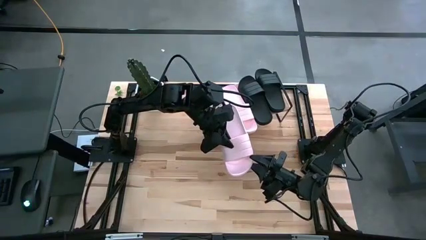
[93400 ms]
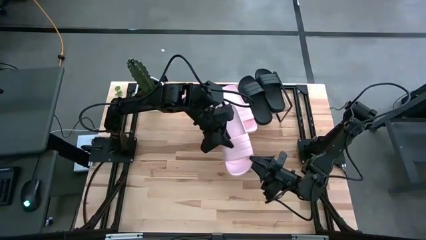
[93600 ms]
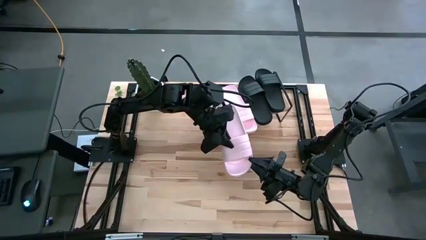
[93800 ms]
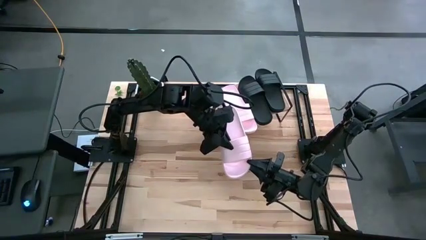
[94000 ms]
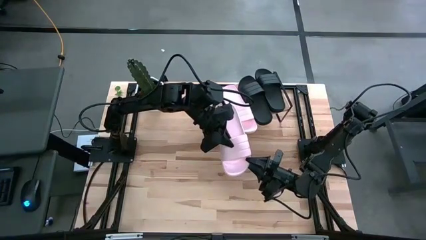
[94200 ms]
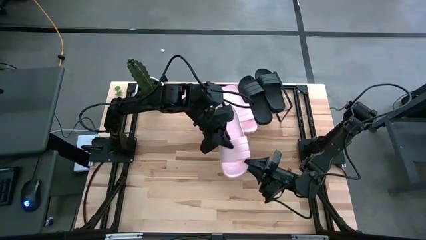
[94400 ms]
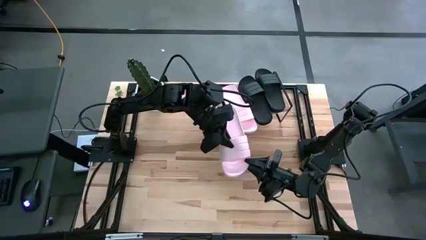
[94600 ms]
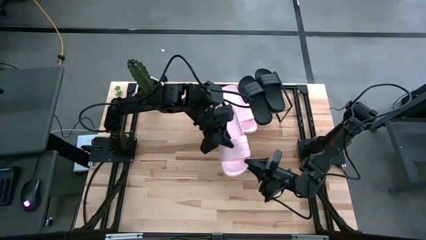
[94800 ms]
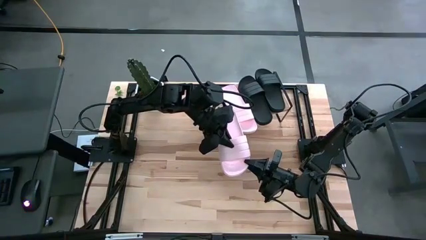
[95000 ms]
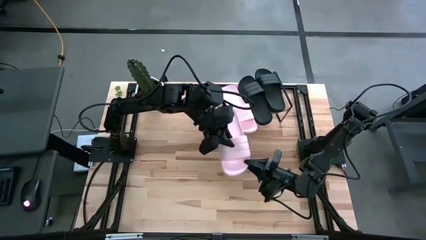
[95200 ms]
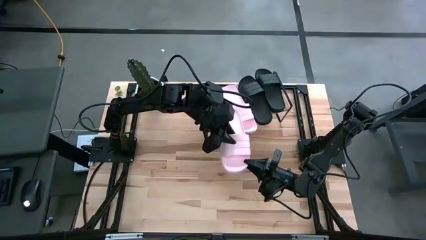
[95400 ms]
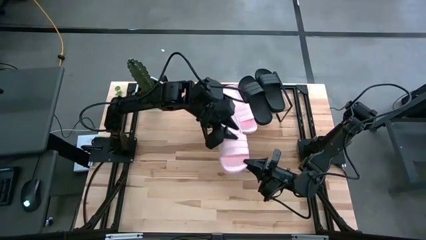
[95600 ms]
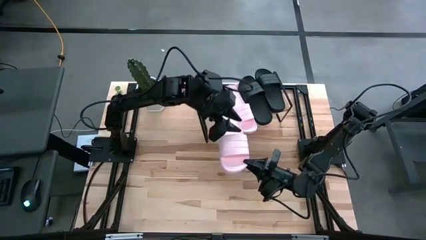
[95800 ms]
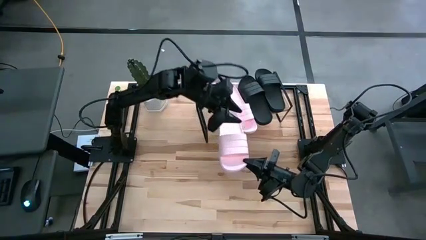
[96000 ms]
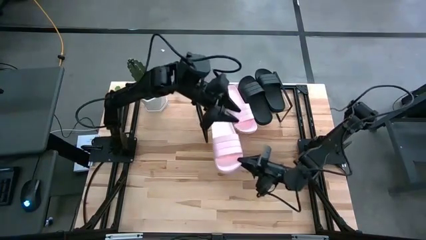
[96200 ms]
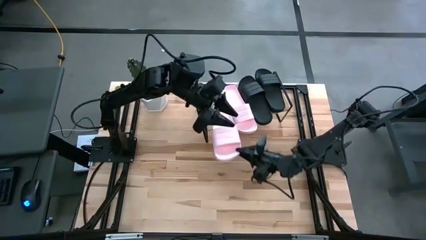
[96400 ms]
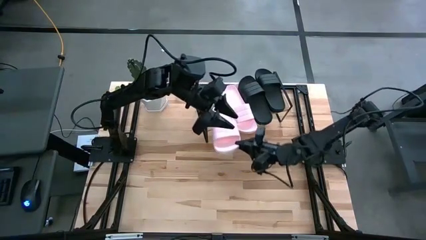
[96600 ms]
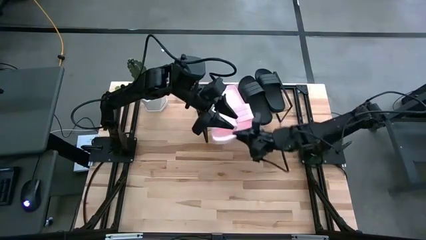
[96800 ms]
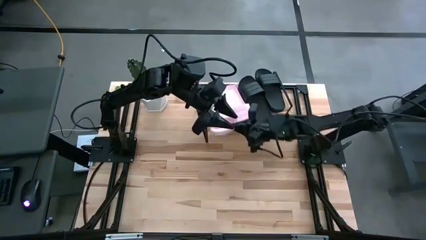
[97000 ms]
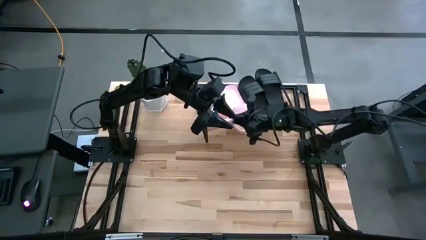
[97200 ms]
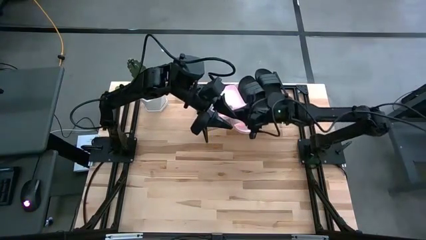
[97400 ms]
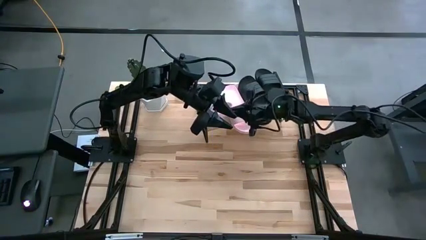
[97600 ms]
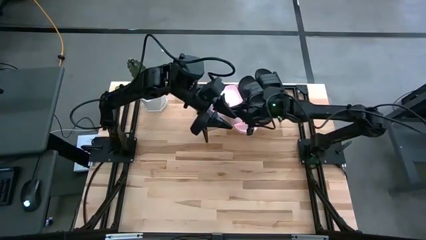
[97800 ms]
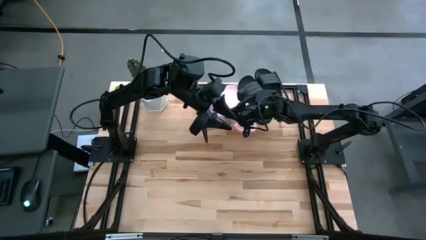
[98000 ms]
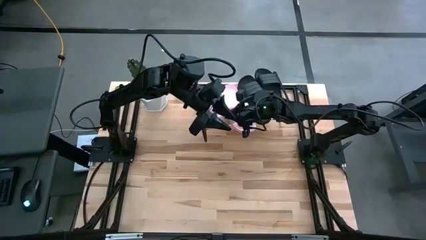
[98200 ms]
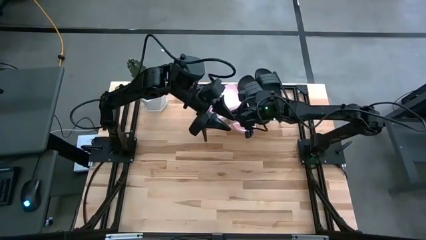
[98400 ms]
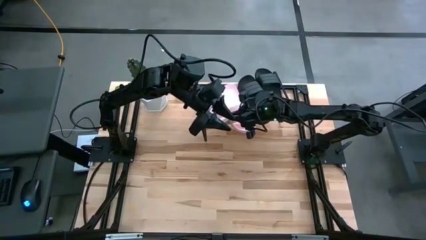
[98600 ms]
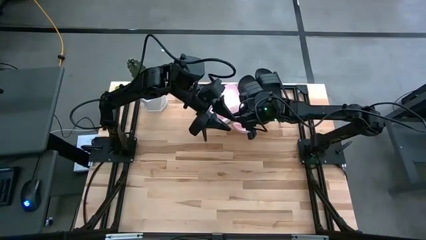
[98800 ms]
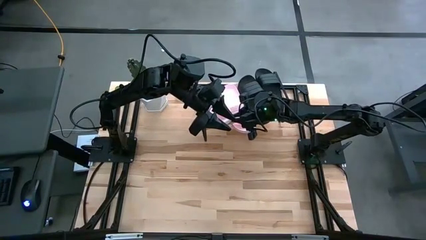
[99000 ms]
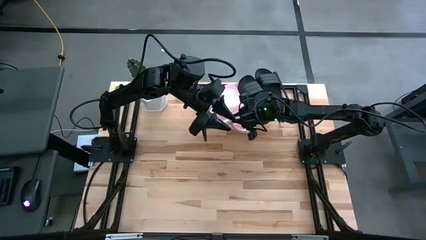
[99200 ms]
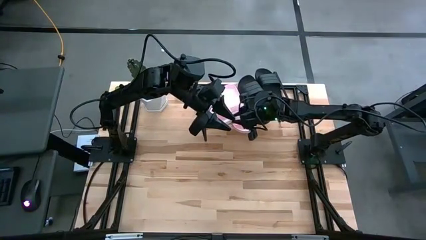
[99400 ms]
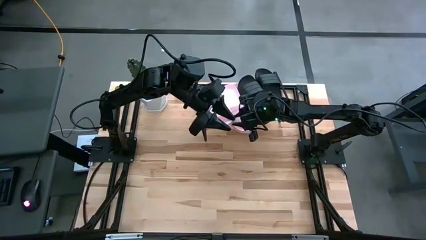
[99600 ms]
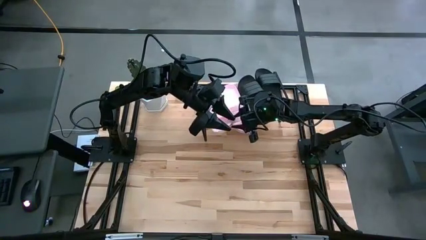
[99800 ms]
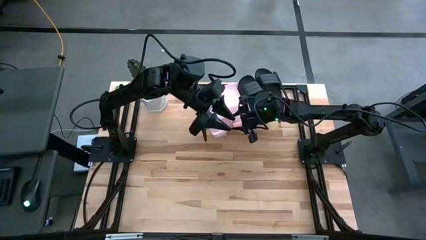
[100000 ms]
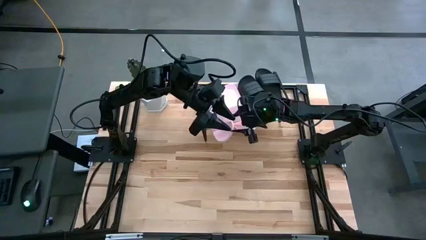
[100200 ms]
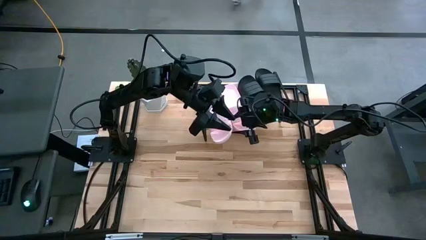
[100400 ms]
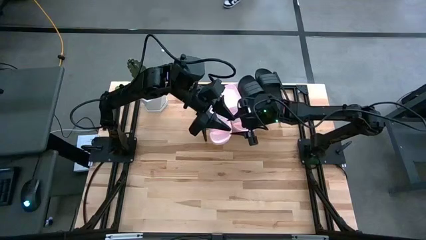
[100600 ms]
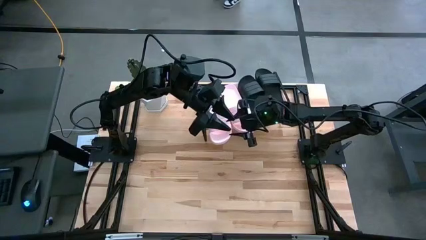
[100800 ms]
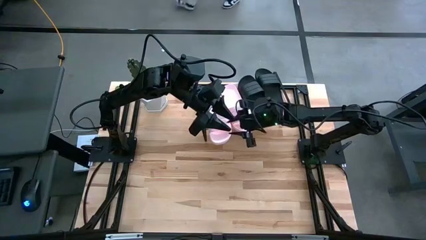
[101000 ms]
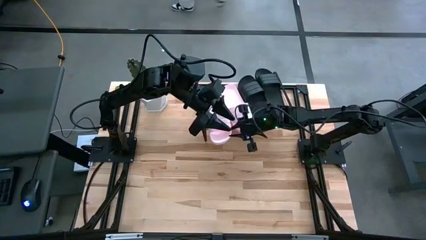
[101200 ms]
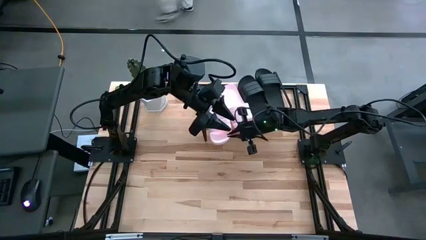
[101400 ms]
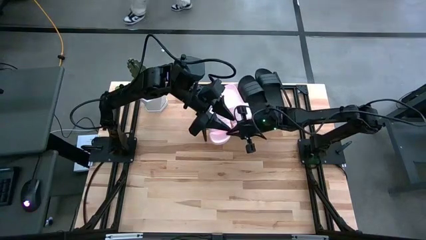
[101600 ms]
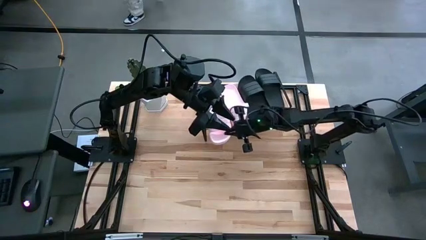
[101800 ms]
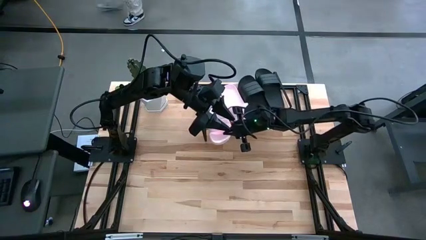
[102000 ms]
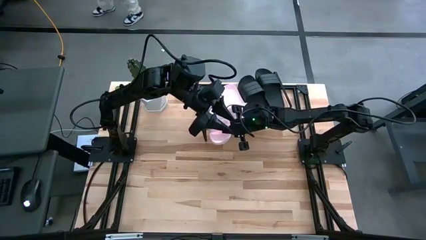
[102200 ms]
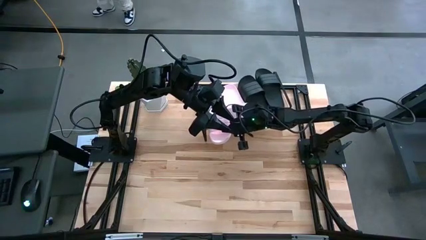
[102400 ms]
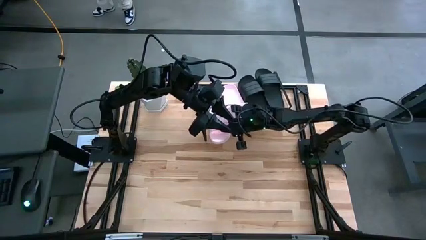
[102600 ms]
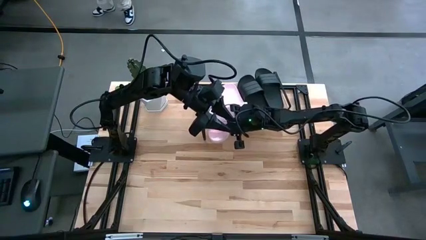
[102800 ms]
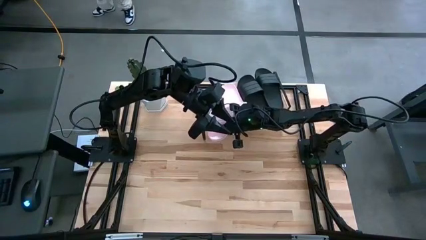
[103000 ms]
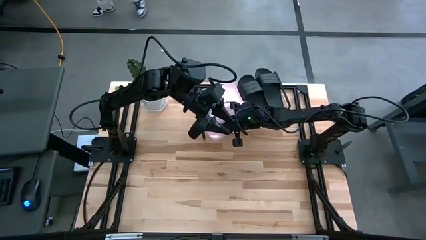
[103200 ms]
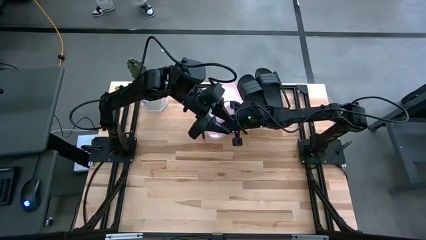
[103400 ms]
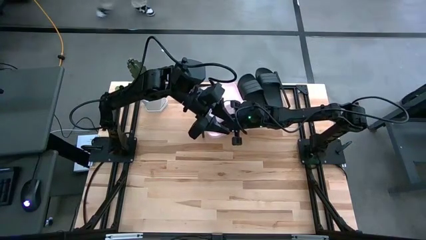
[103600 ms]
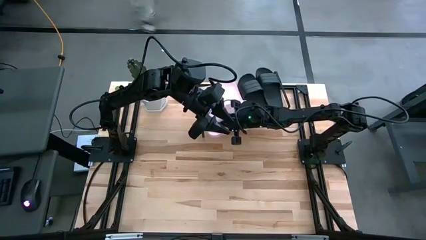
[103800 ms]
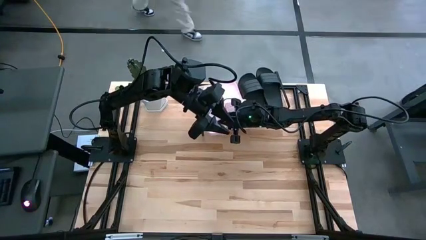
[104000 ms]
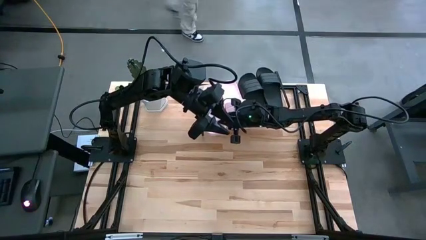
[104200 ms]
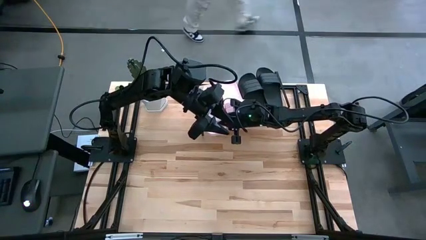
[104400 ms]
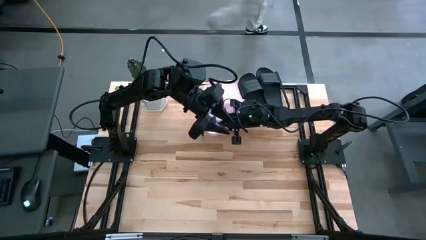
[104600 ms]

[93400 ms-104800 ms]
Task: Pick and place slides into the shelf
Put the pink slide on the shelf
